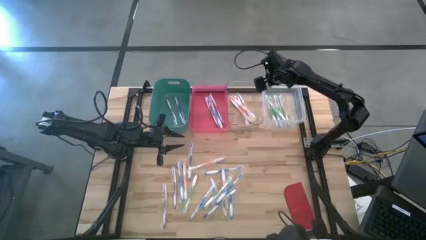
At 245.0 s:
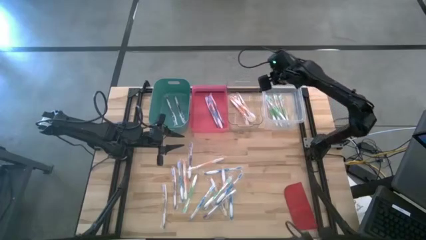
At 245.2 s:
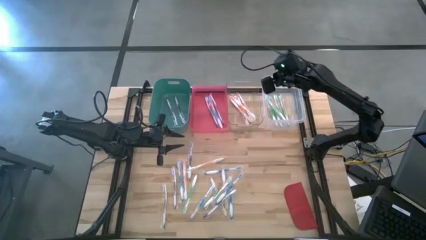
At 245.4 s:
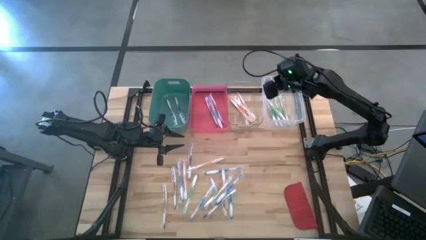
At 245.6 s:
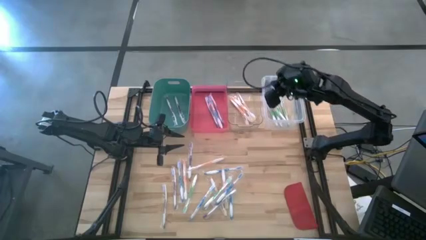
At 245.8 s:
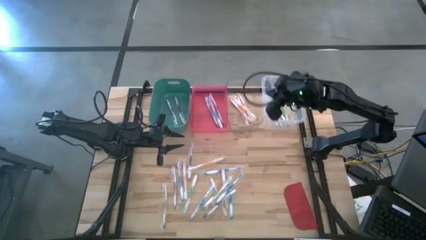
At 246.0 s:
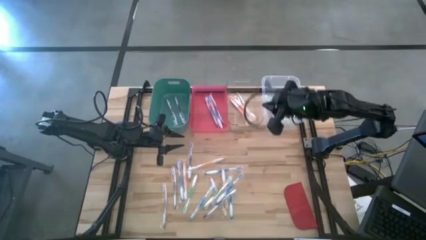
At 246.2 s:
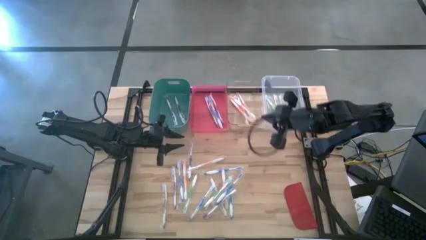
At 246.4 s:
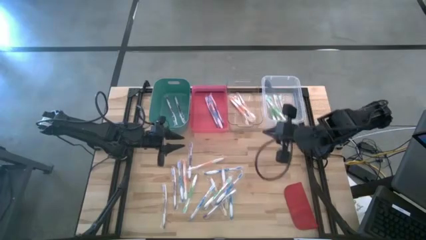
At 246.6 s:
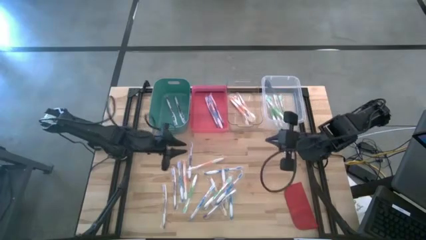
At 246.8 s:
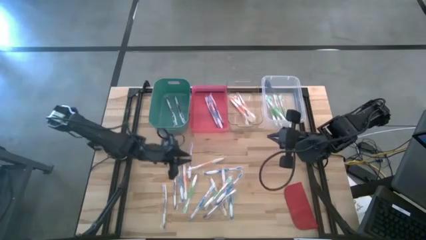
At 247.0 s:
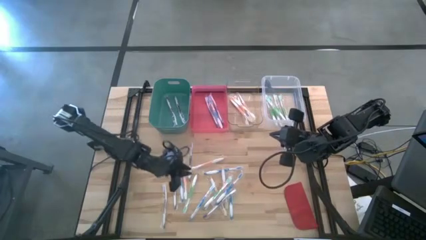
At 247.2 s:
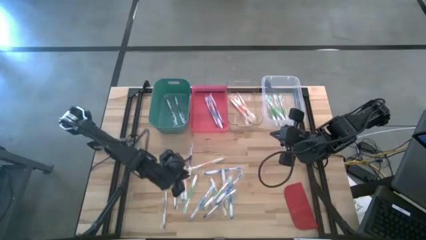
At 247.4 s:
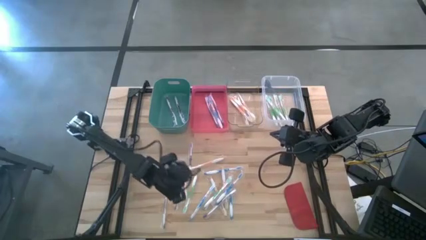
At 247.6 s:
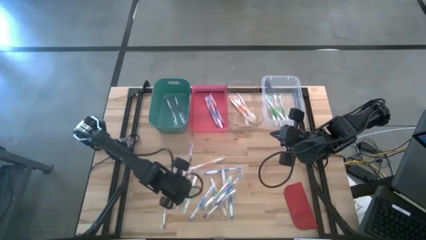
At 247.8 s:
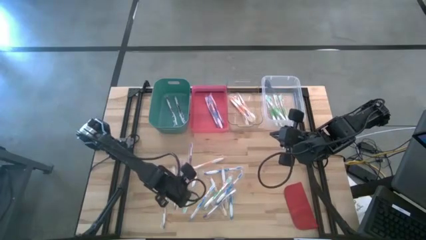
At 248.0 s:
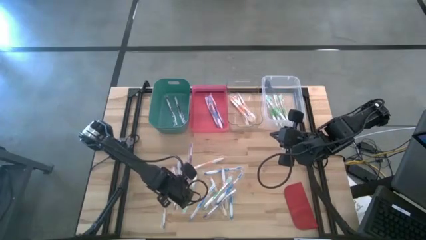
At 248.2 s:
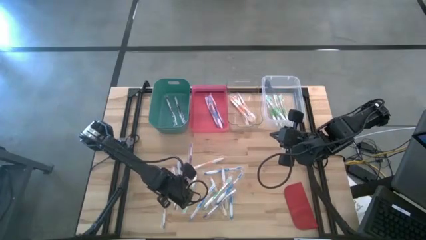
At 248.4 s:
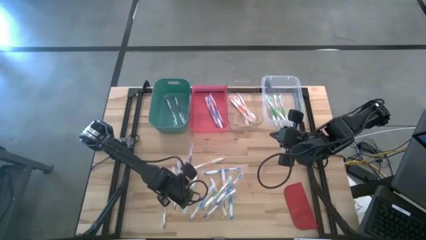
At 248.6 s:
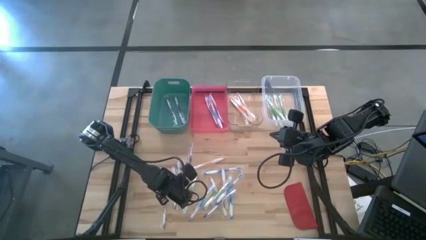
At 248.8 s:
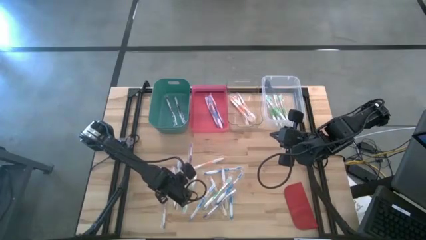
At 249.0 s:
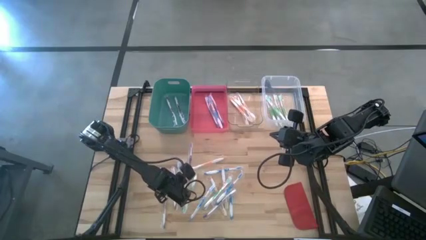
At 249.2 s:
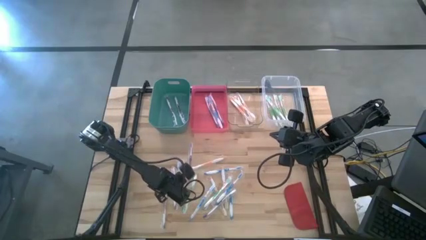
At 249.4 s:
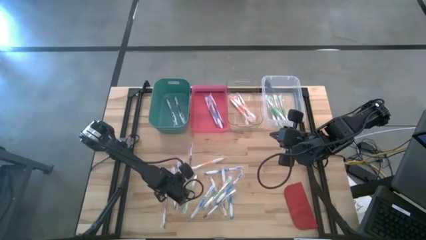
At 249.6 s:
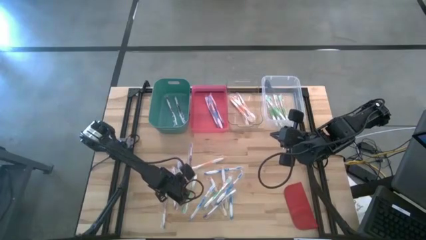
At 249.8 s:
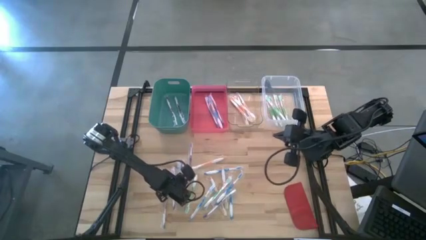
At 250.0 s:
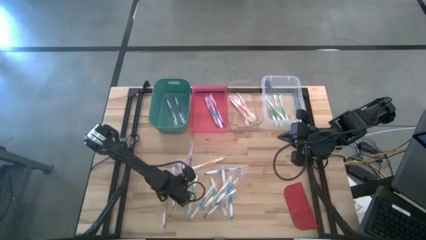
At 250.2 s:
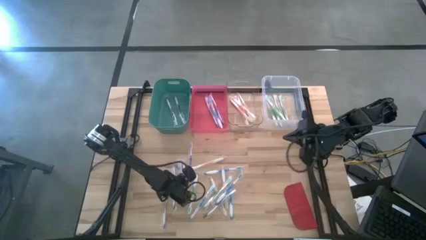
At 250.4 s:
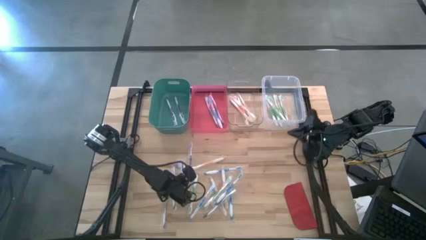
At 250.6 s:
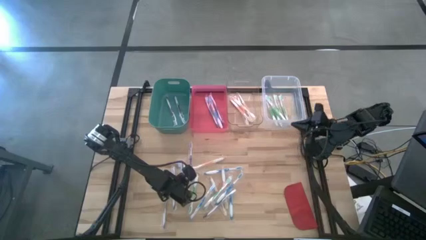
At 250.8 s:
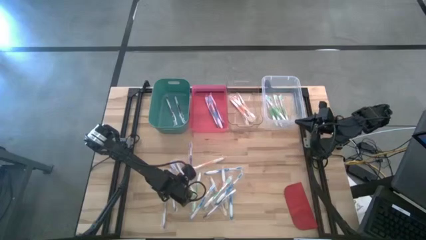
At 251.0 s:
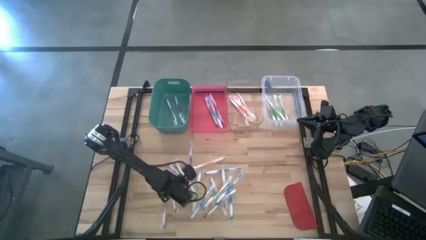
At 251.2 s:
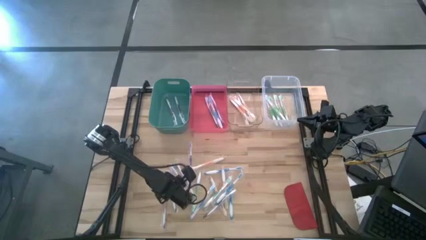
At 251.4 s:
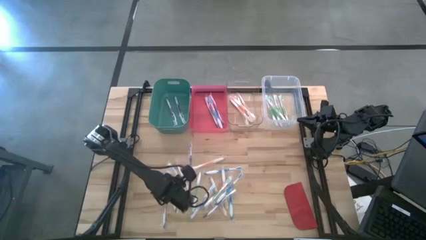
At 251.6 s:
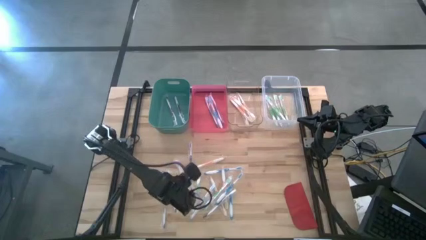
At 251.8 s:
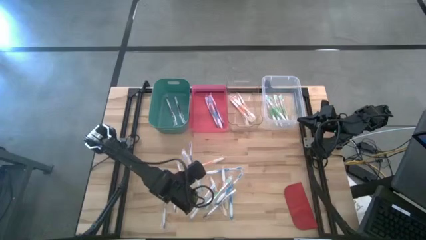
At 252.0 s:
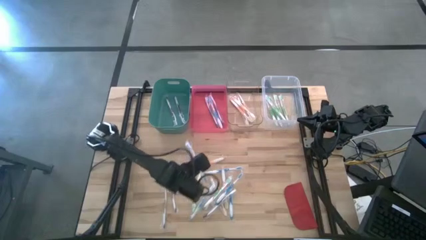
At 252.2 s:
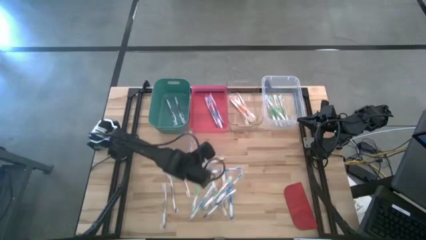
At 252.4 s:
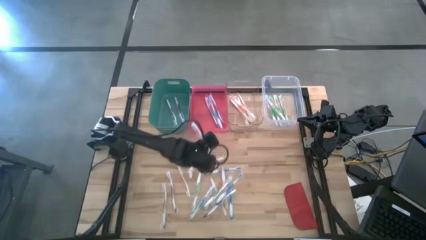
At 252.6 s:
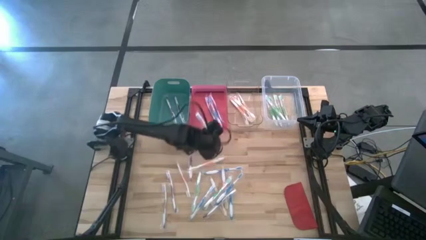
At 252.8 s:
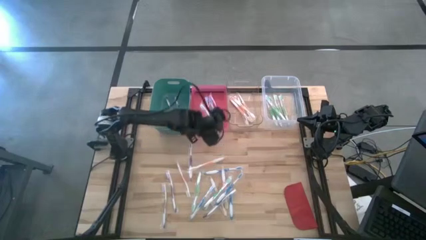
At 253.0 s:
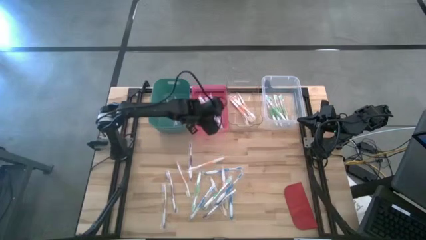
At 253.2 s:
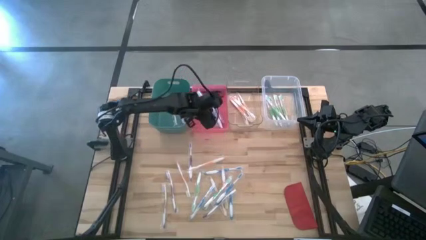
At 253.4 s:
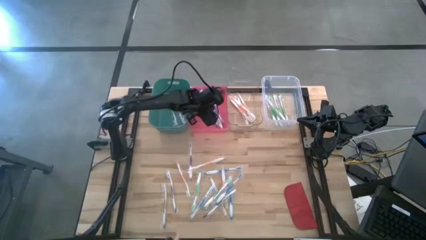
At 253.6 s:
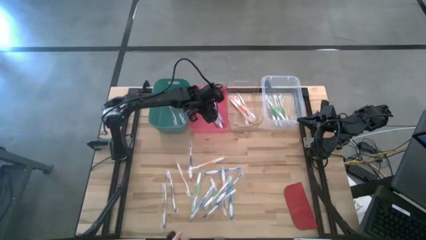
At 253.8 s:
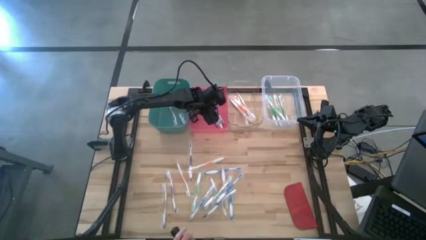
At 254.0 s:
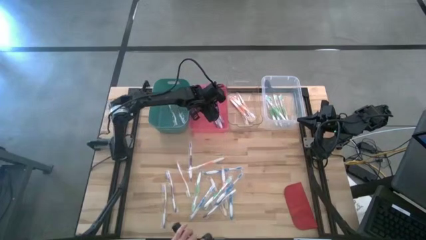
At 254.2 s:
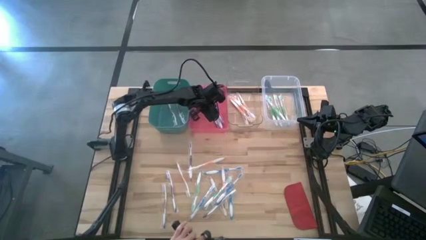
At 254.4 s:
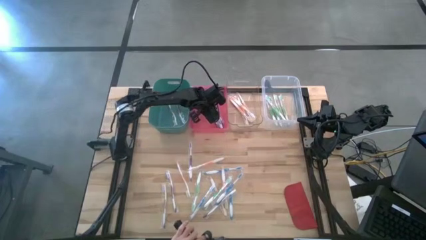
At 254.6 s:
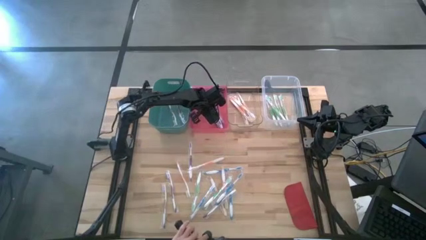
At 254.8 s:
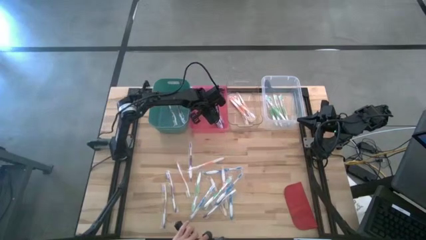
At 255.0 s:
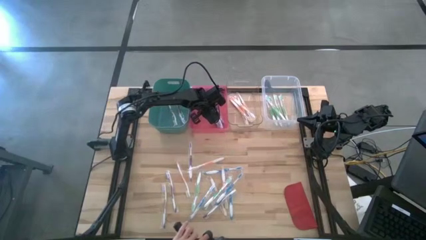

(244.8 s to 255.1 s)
Task: Pick & Place Toothbrushes
Put the blue toothbrush into the red bin

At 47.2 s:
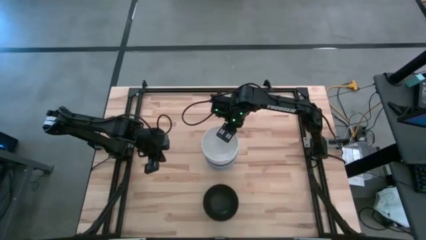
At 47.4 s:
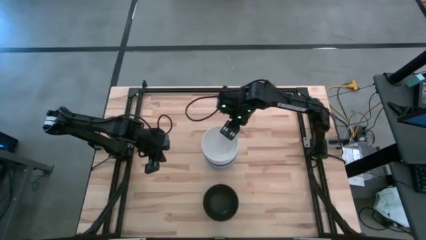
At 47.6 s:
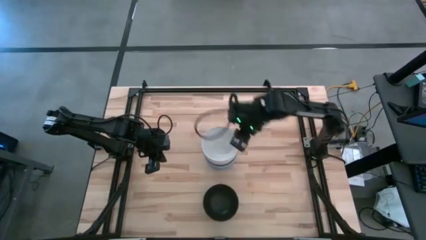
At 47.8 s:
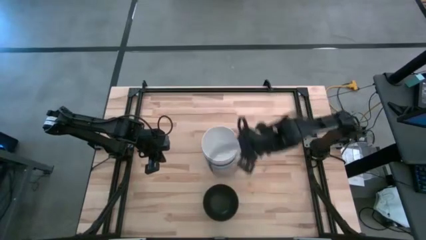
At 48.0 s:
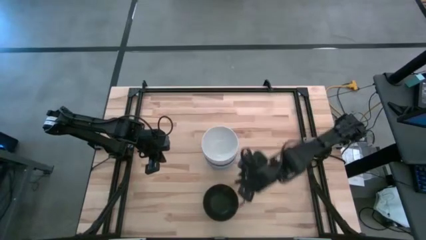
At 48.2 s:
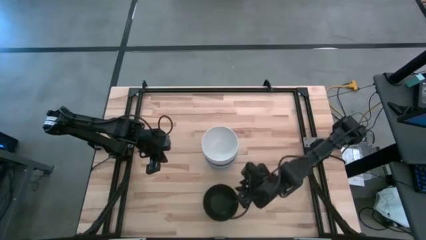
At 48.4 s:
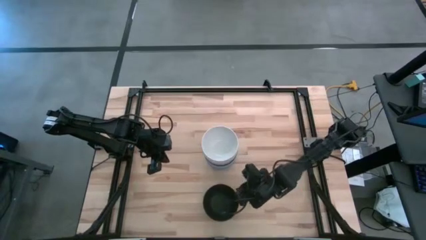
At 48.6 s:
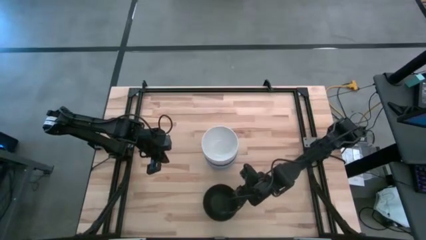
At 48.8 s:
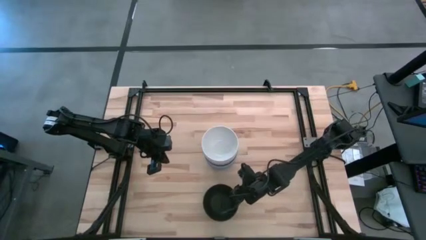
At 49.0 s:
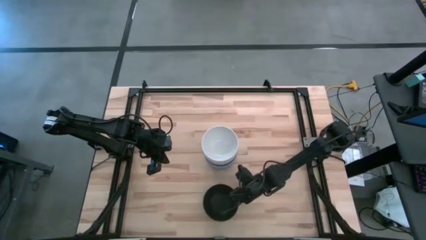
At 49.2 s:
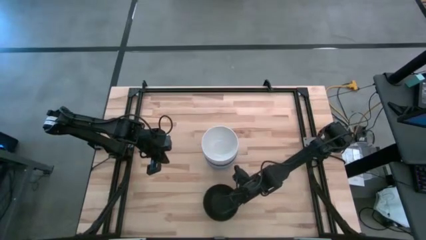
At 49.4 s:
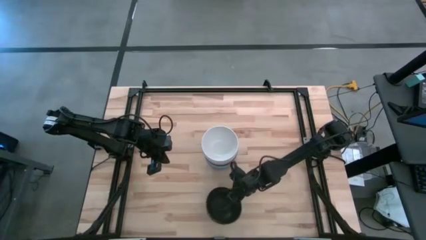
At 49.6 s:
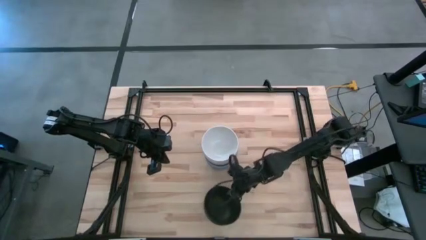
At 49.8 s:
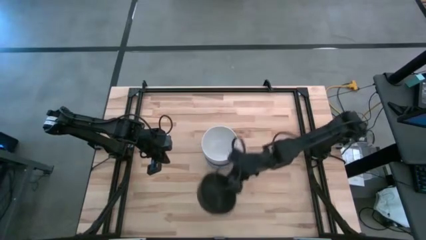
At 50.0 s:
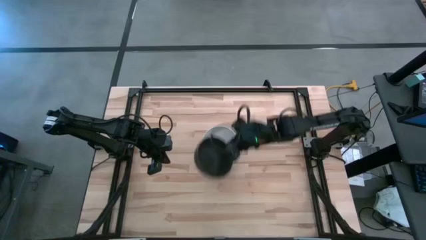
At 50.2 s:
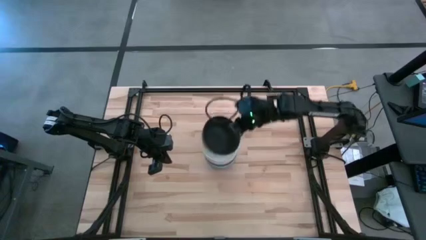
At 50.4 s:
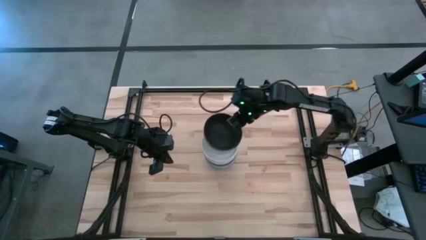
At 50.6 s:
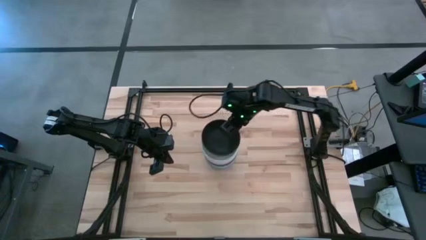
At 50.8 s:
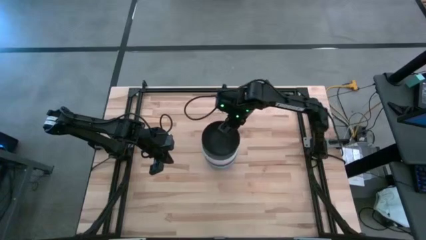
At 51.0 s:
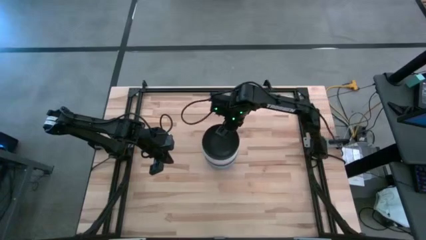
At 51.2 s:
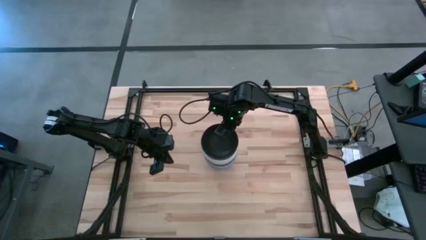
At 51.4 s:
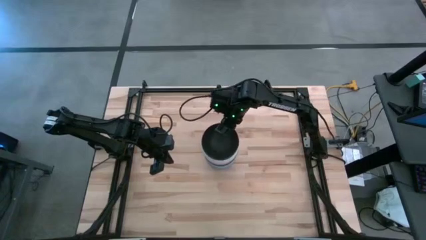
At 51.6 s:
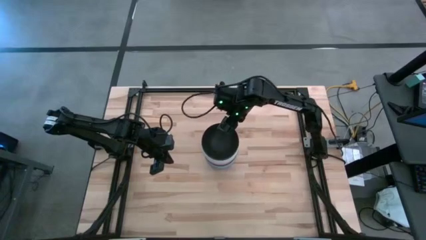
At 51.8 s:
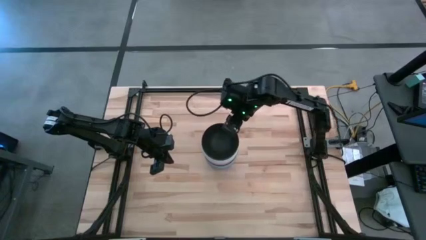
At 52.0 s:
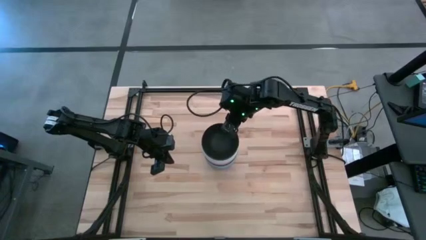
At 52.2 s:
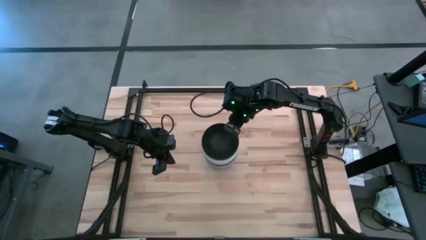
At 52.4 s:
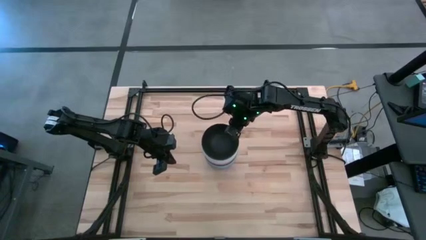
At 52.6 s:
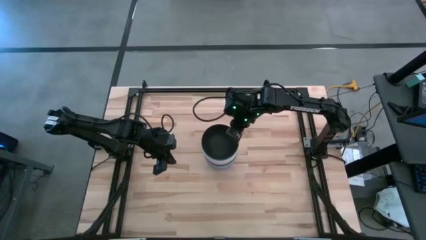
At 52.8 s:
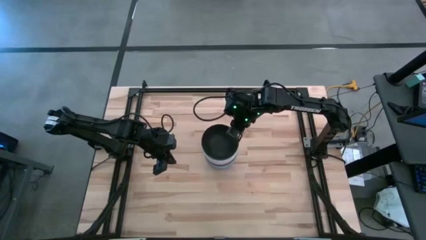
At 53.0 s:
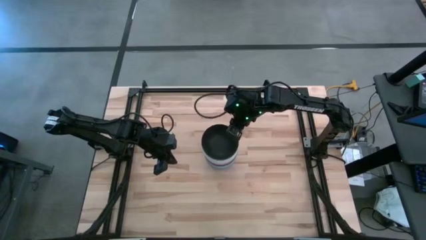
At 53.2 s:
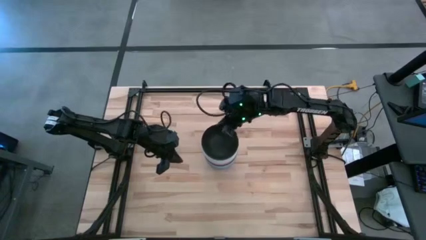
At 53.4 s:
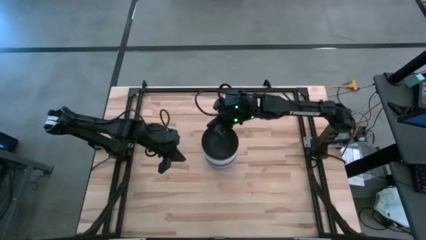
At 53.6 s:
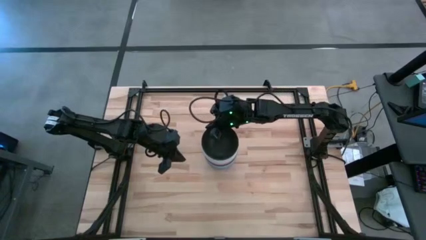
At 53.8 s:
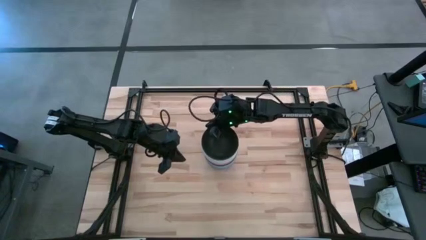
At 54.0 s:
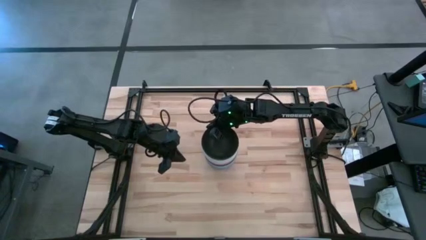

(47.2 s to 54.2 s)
Task: Nest bowls inside each other
Stack the bottom black bowl on top of the white bowl
